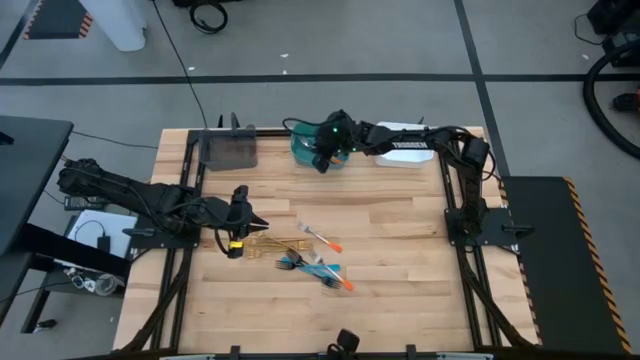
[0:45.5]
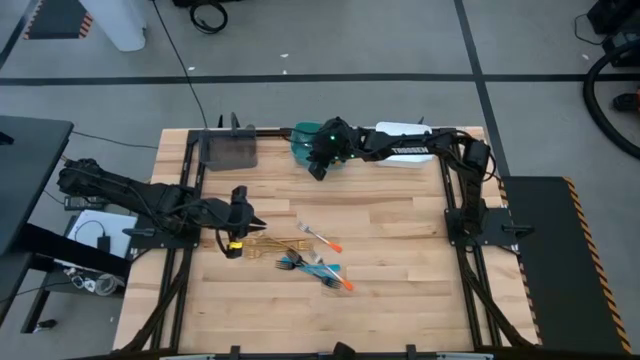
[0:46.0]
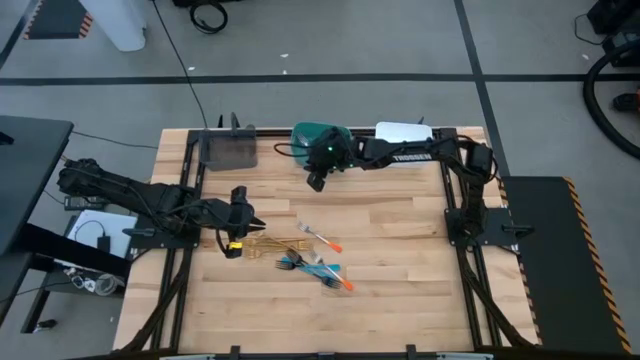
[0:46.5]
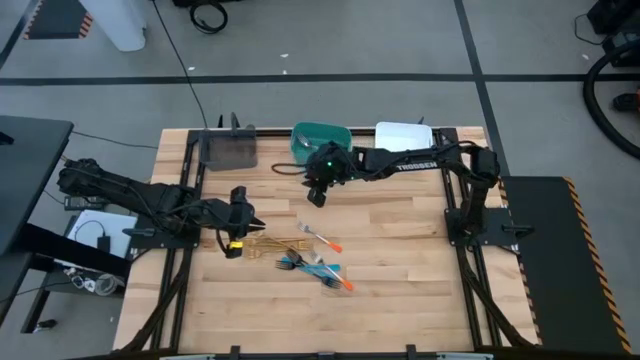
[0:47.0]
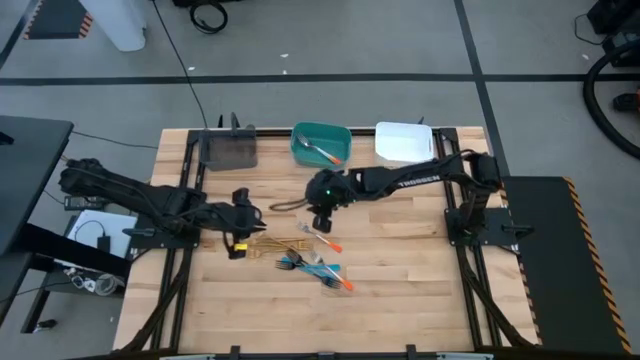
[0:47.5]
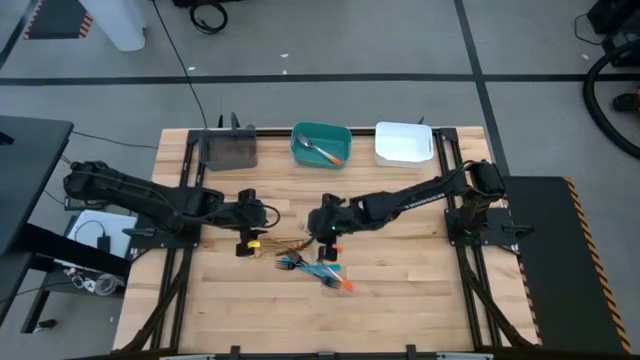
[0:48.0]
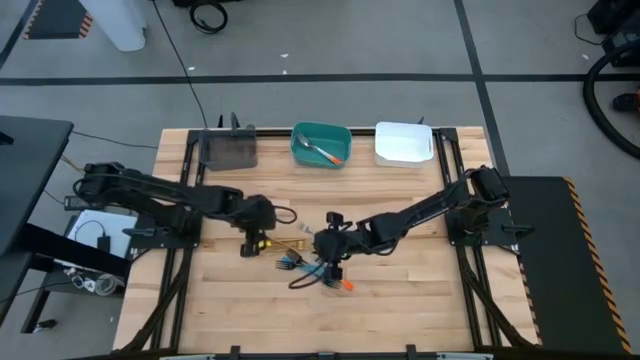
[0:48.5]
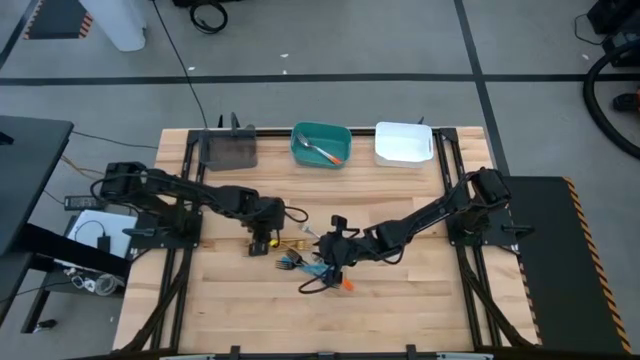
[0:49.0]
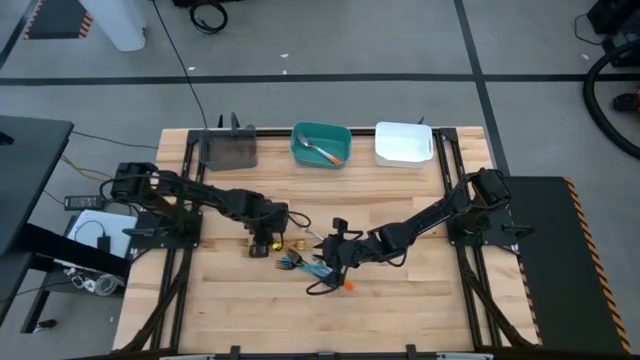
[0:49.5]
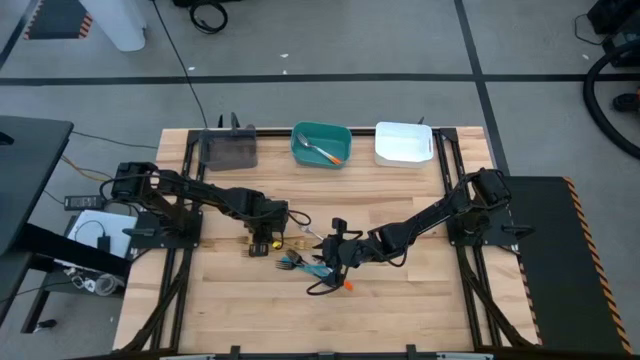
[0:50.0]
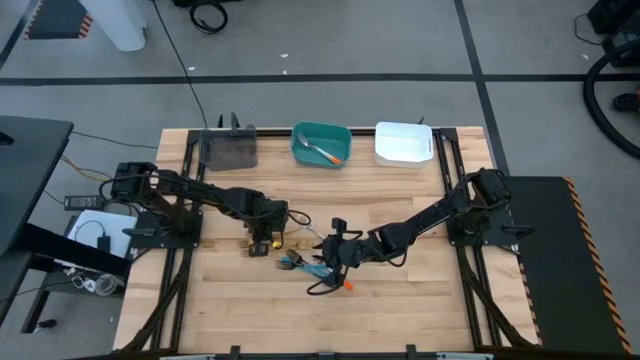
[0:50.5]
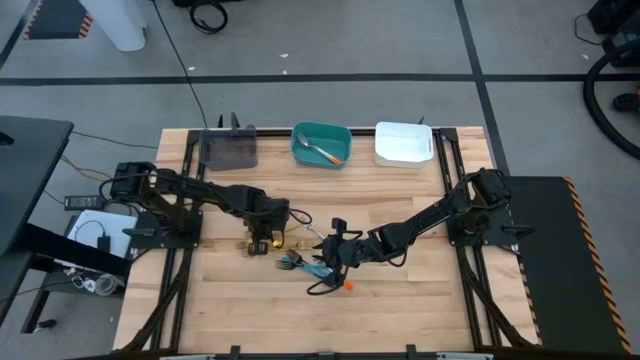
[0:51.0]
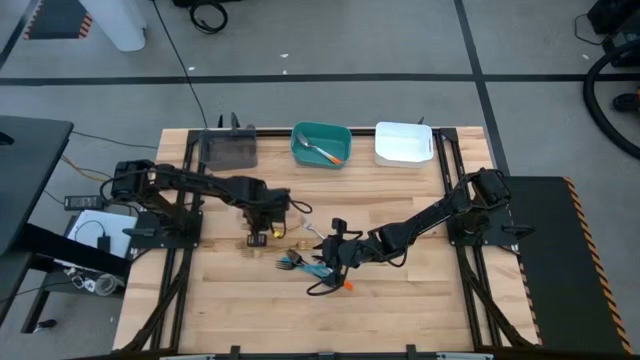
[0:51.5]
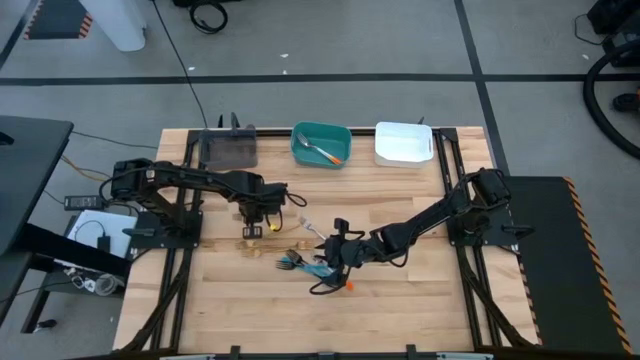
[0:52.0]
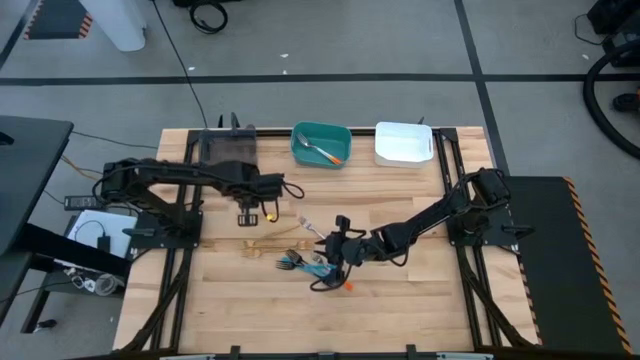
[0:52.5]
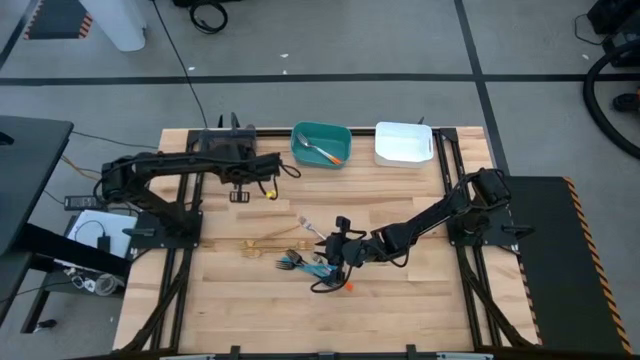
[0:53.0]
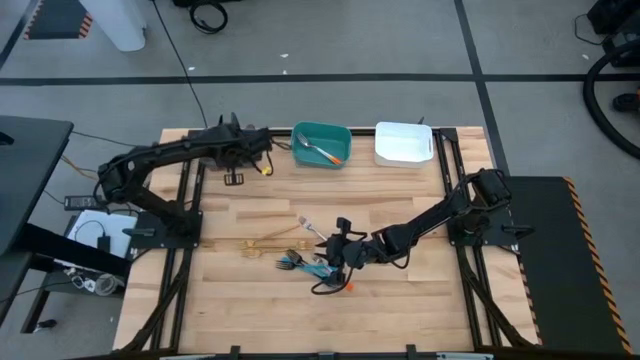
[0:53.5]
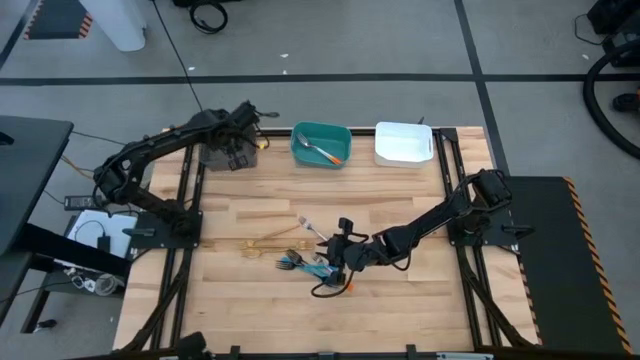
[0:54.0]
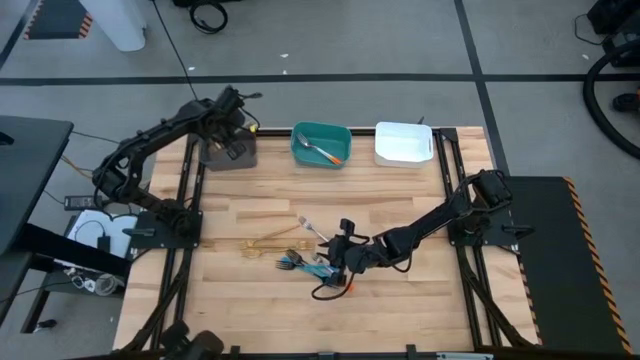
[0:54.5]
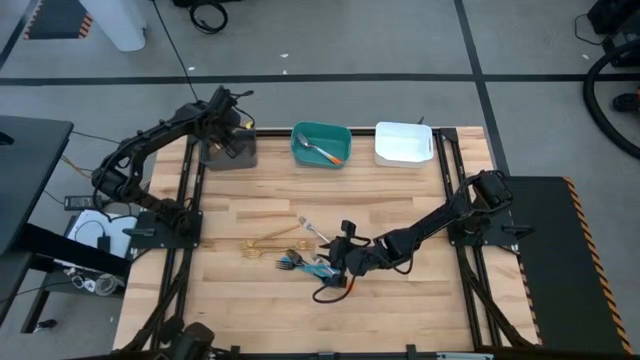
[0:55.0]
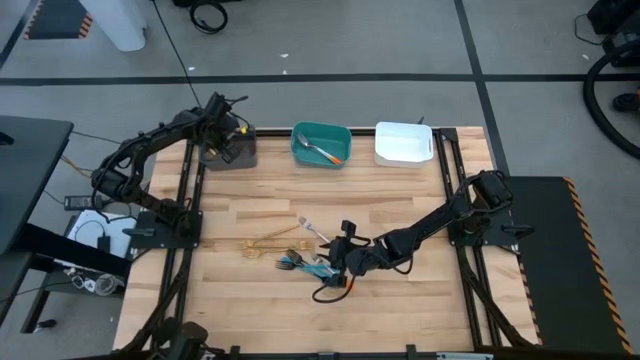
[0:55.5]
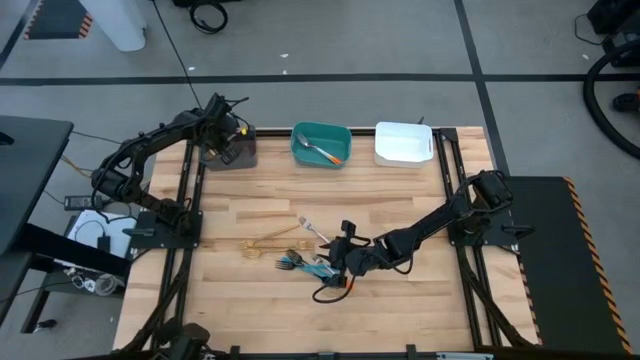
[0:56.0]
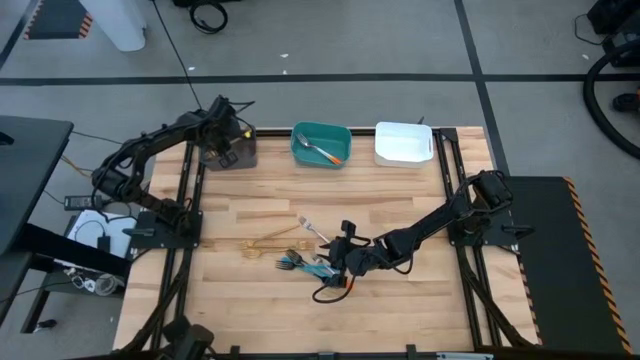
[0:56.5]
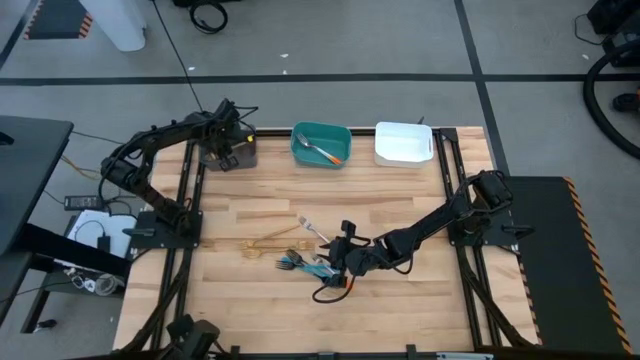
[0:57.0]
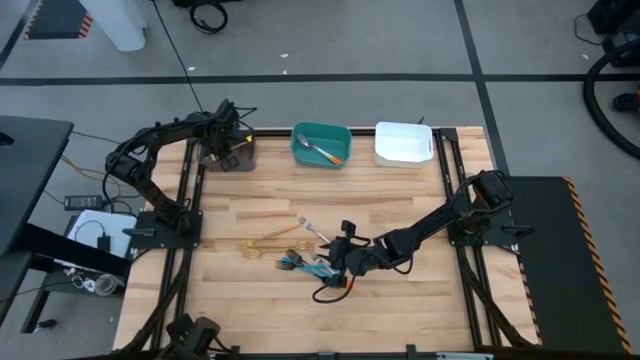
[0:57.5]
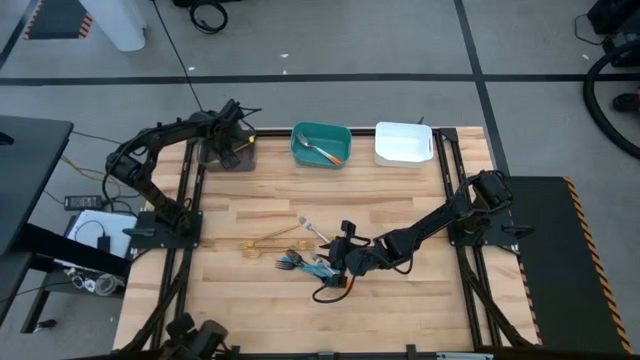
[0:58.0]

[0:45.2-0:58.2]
Task: Sort silverware by color (type)
Put the gold fork into the black bin
